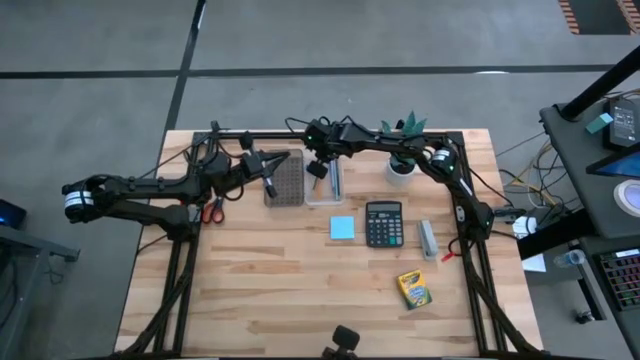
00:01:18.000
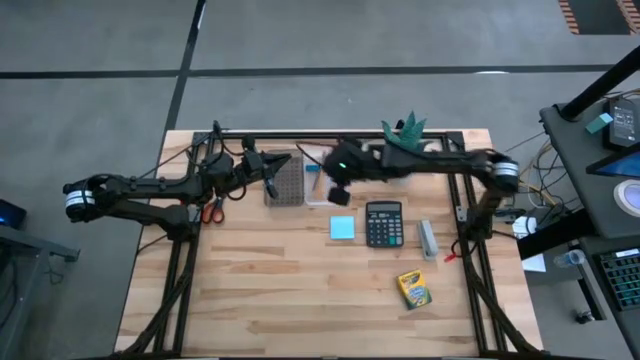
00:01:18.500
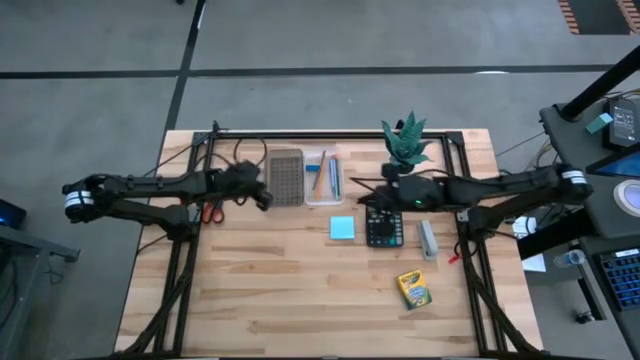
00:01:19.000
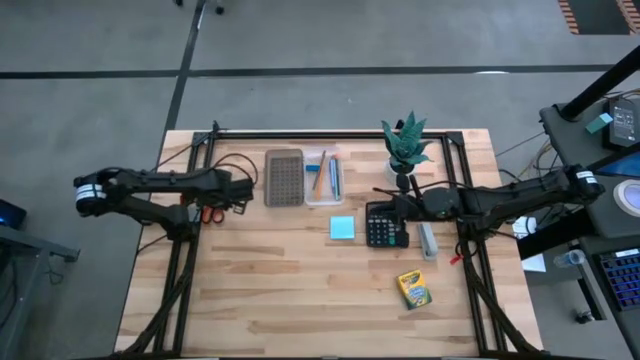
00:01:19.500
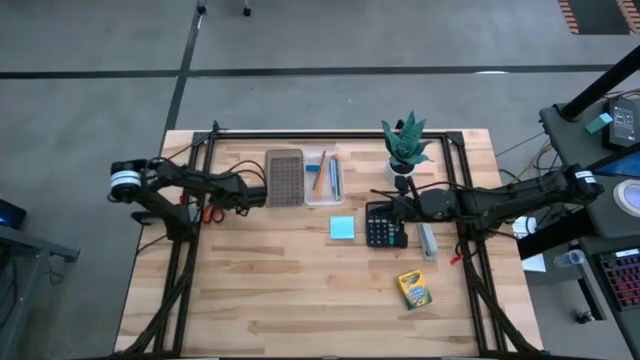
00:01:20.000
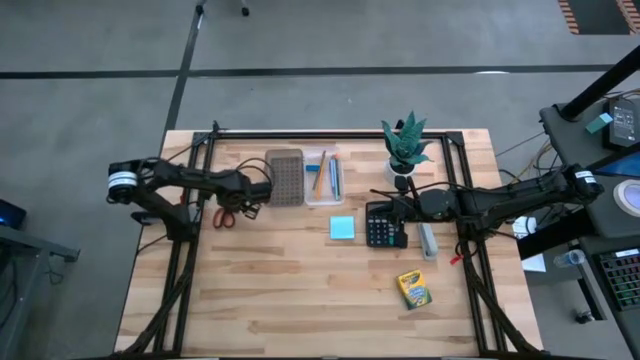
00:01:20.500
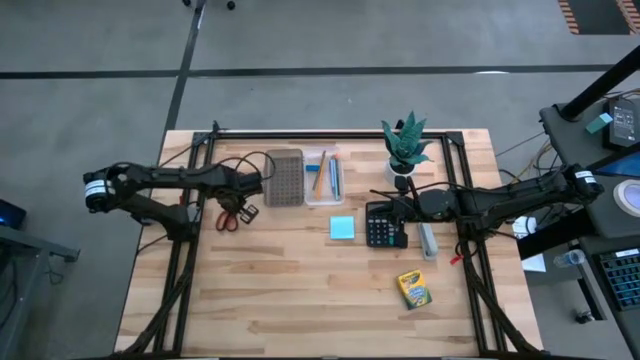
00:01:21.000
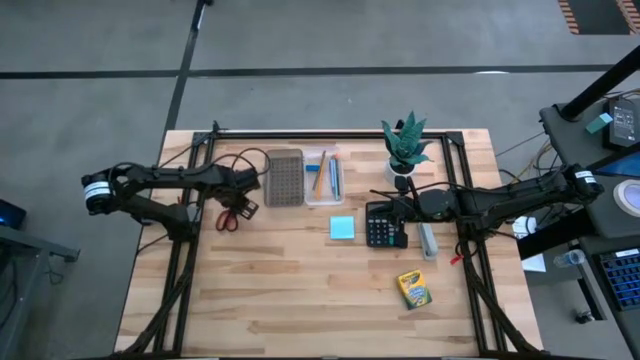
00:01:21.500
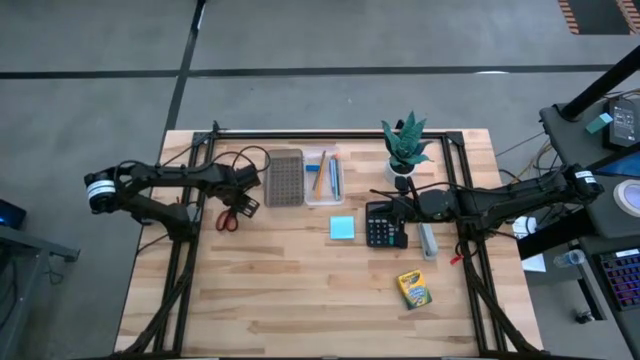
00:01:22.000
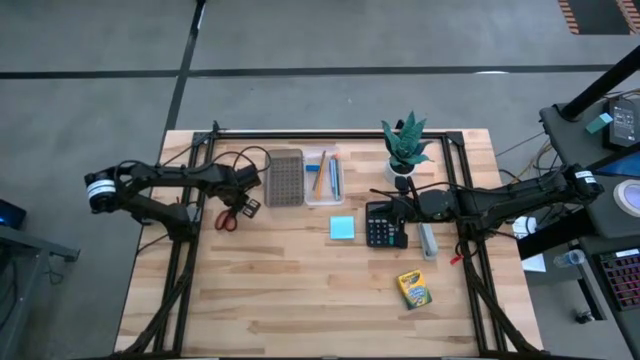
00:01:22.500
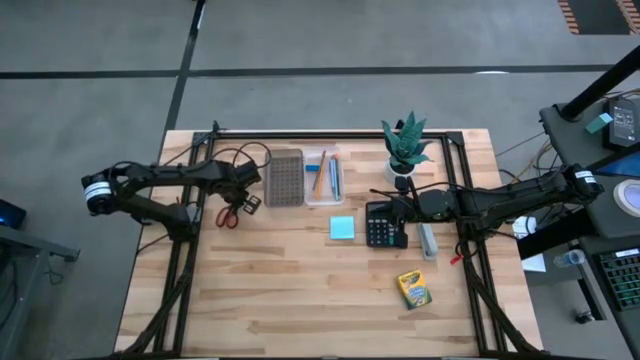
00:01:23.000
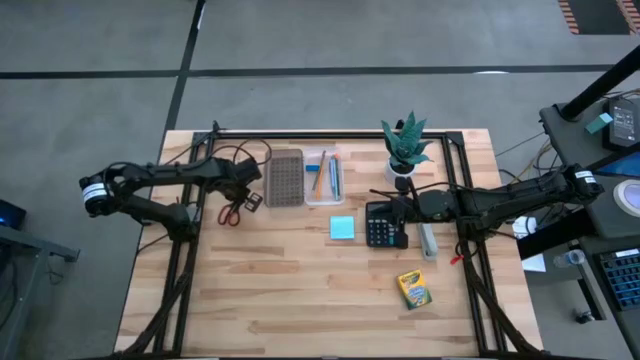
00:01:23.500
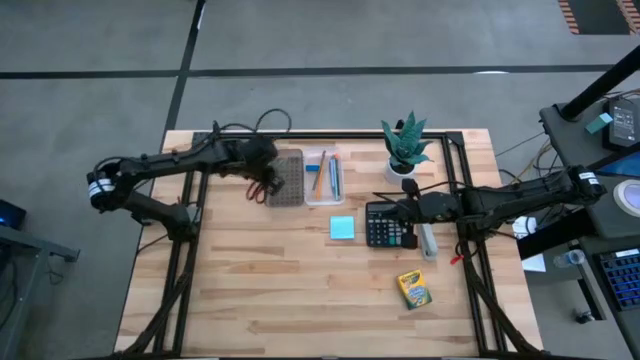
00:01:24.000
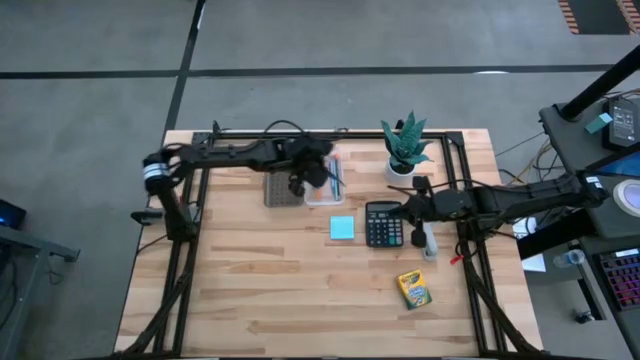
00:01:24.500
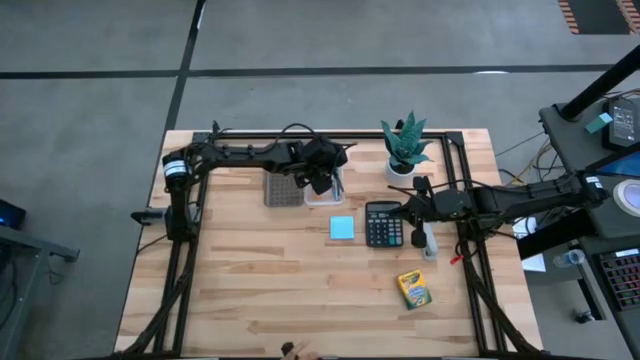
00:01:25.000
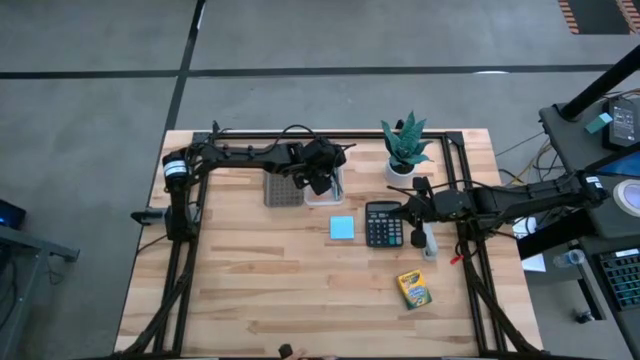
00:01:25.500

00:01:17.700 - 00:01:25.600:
Task: Pack school essentials
Put the black scissors into the transparent supply box

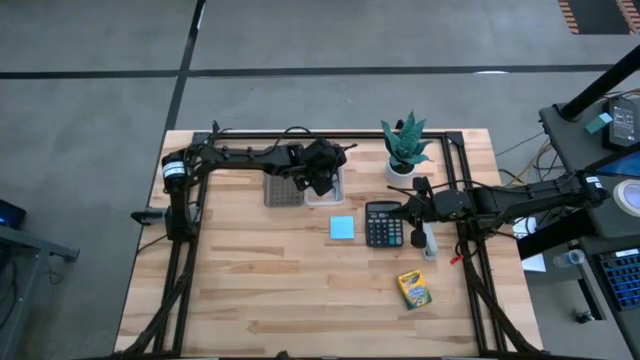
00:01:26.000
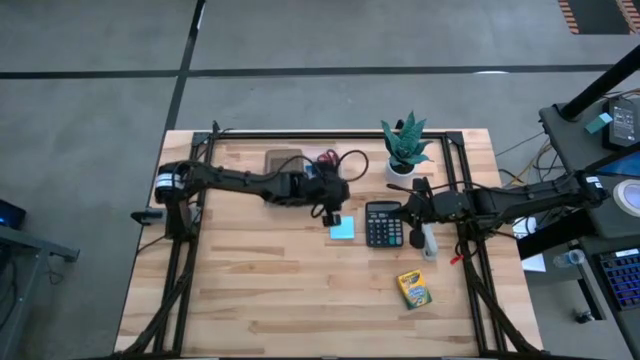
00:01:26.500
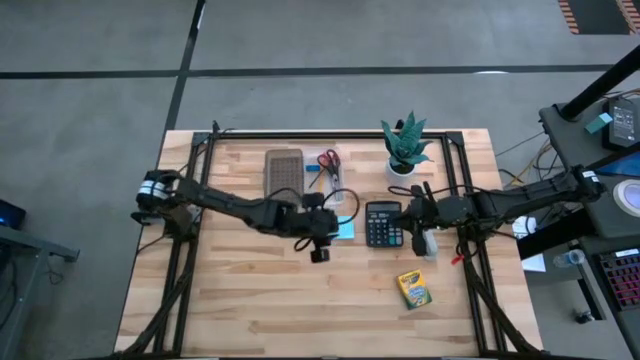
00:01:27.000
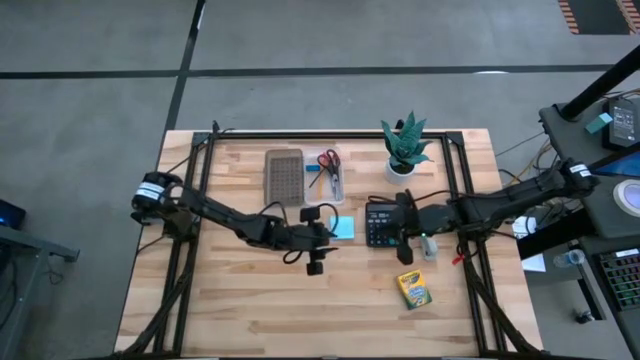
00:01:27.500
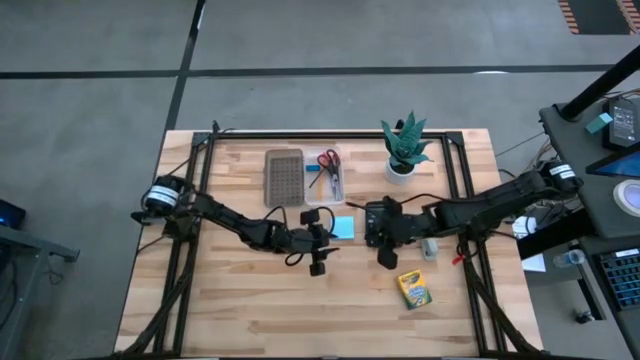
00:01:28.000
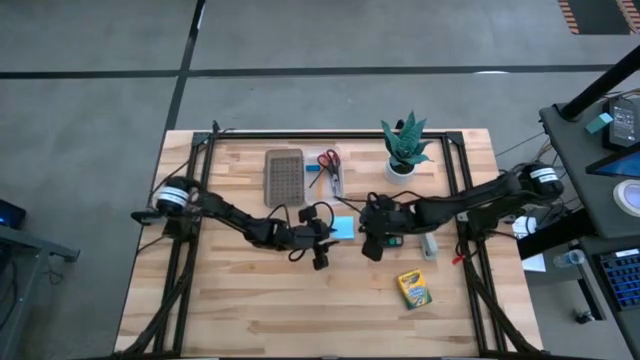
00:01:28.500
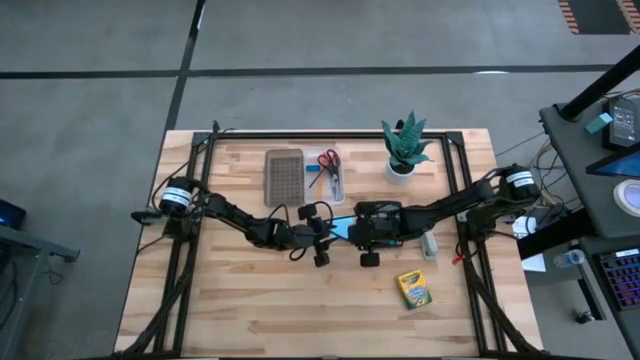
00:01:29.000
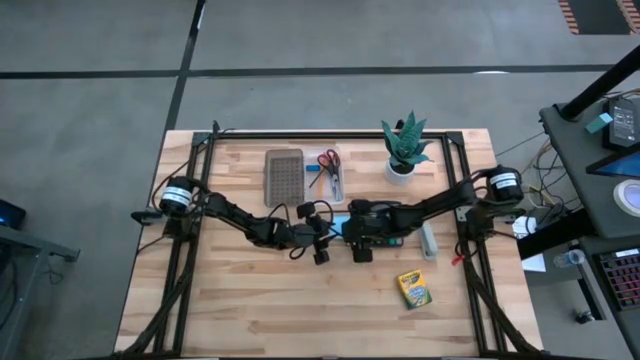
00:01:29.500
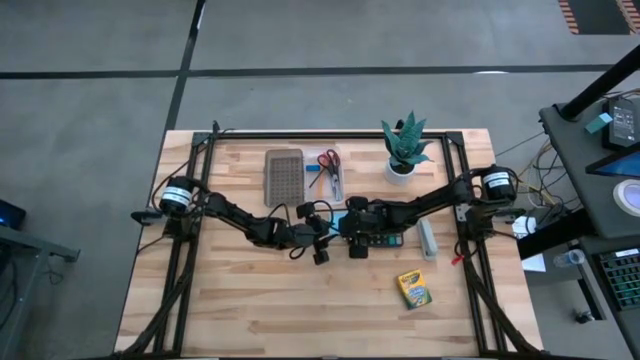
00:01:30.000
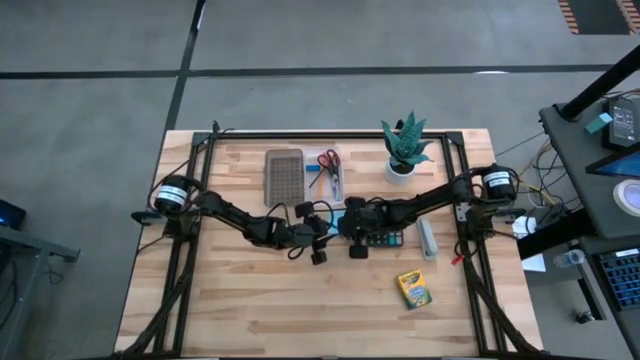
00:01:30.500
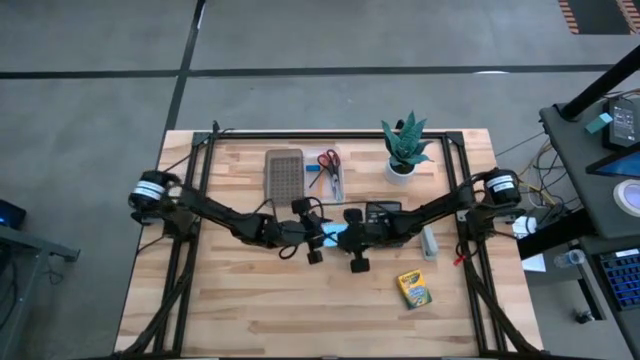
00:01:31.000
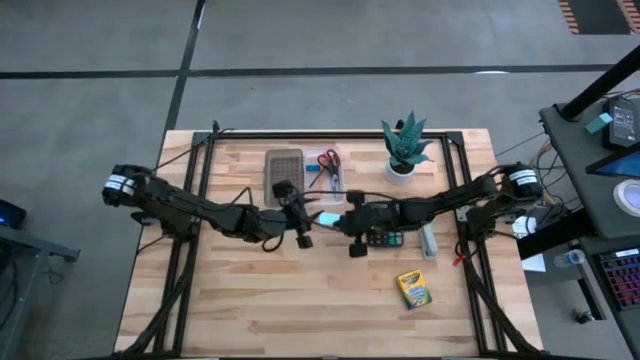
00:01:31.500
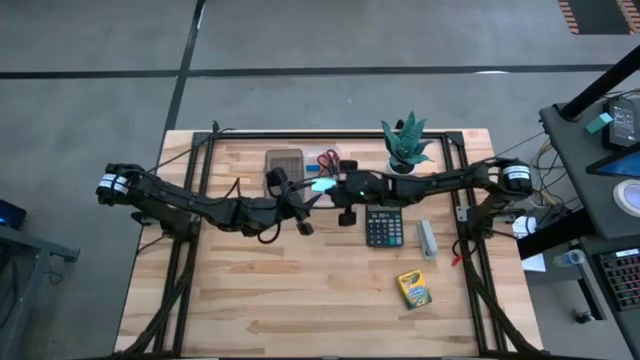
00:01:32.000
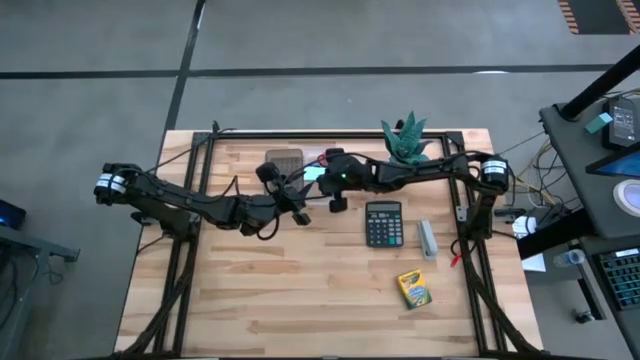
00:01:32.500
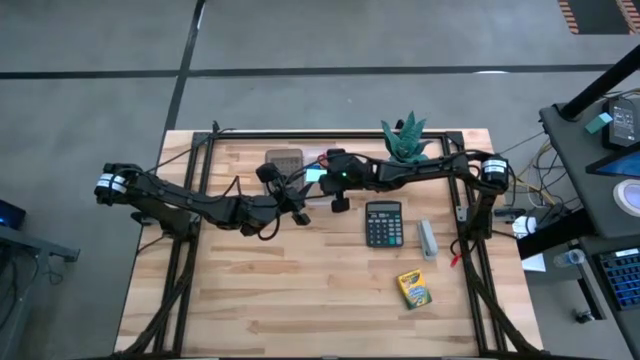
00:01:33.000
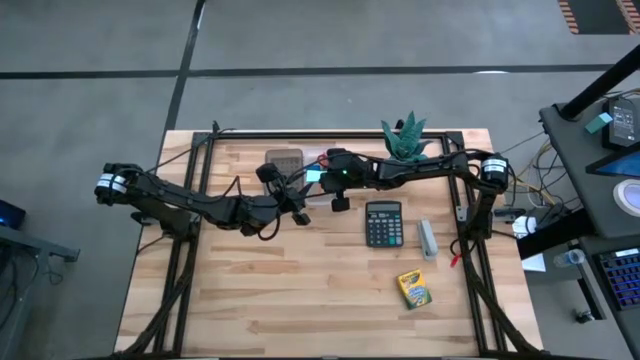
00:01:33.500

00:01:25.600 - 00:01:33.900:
Put the blue sticky notes into the transparent supply box

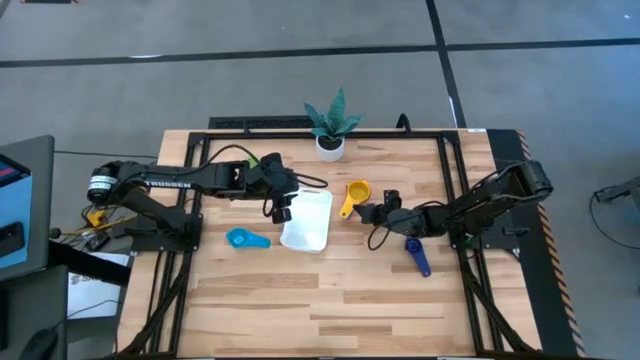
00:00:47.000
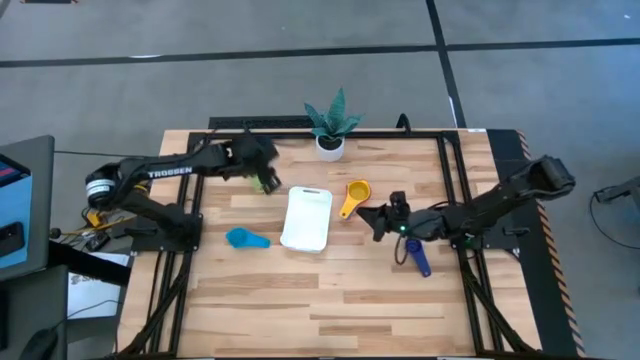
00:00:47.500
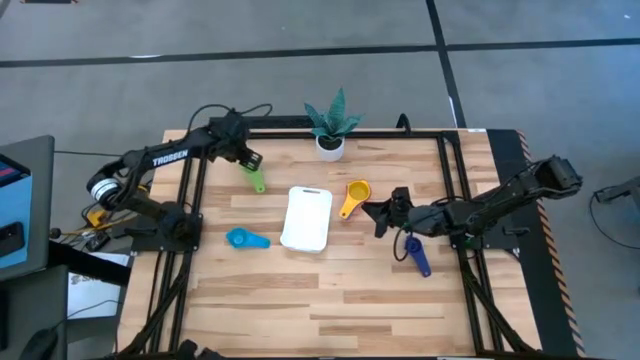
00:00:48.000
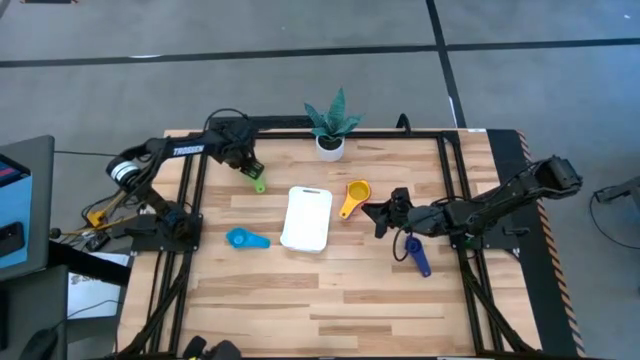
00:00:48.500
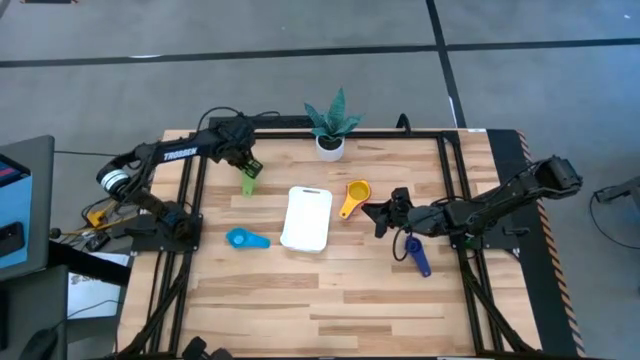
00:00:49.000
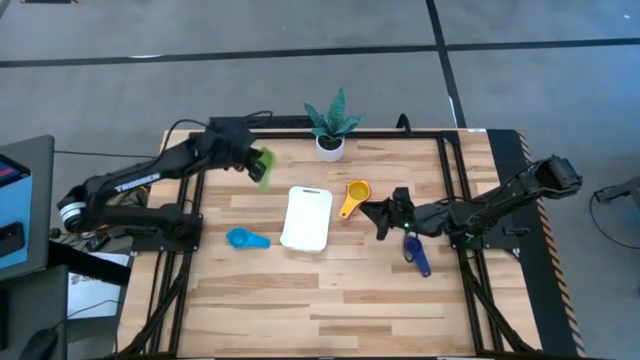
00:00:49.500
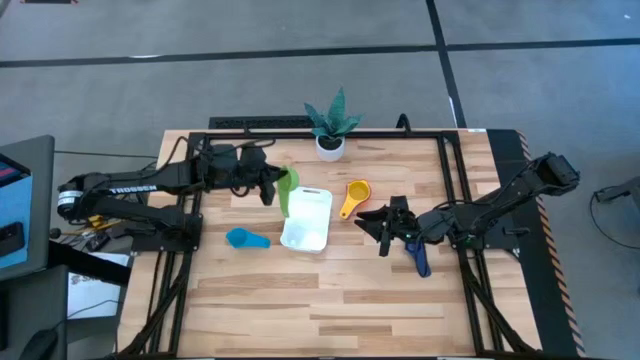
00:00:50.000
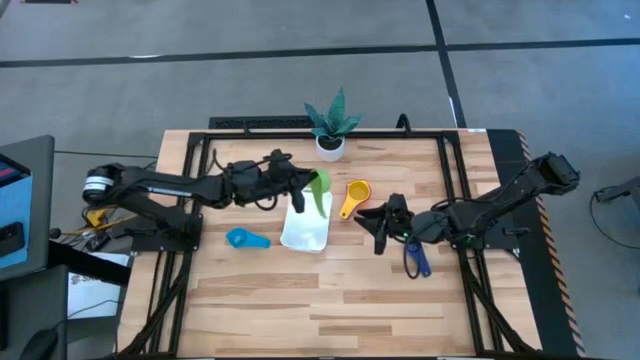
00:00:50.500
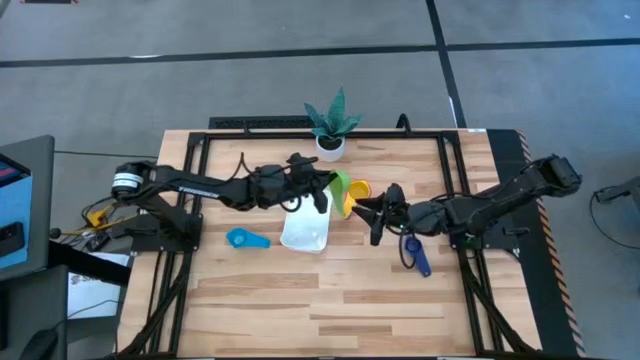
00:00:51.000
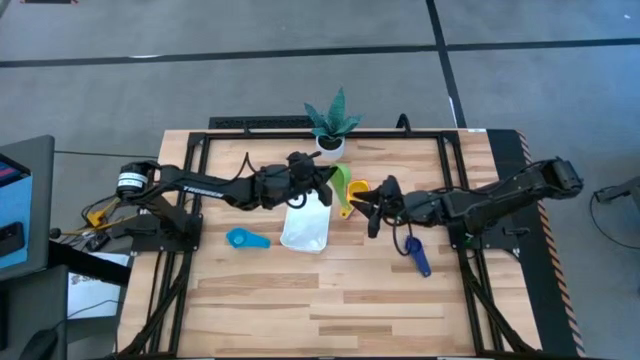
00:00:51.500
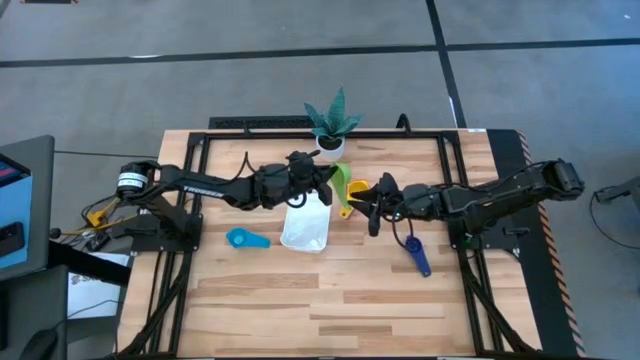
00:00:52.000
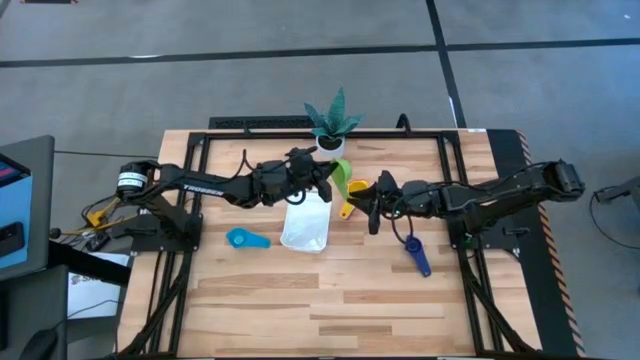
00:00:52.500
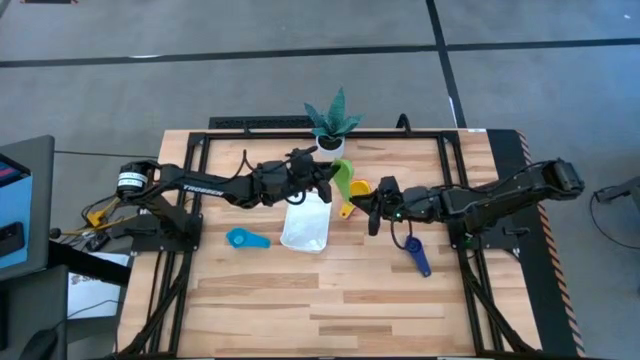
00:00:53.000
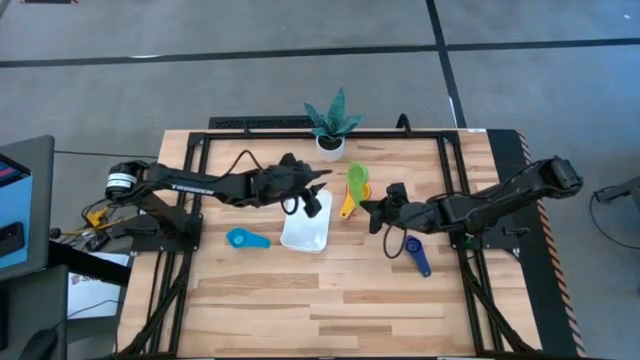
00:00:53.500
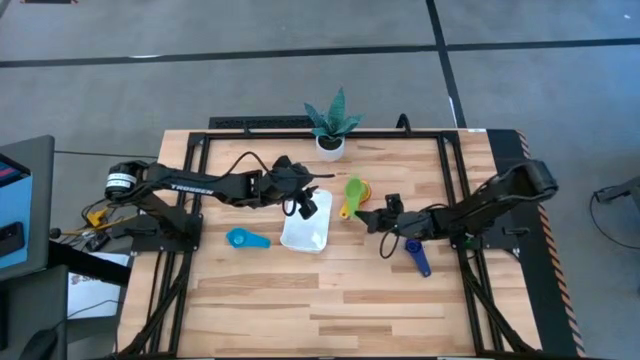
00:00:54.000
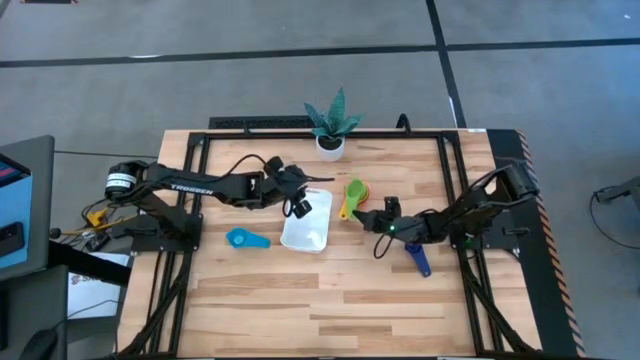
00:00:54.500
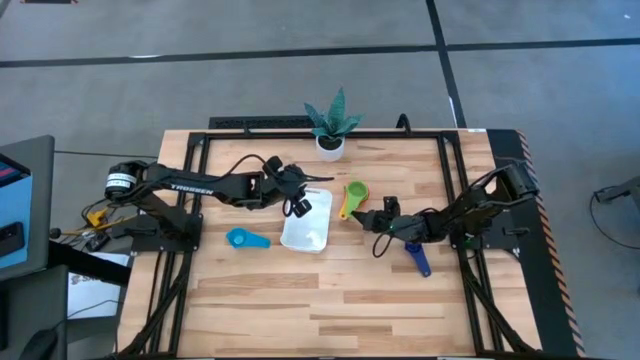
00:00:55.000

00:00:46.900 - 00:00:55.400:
Task: Nest measuring cups in basket
Stack the light green measuring cup on top of the yellow measuring cup
